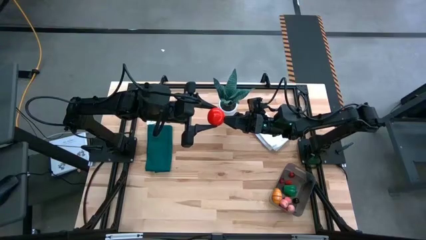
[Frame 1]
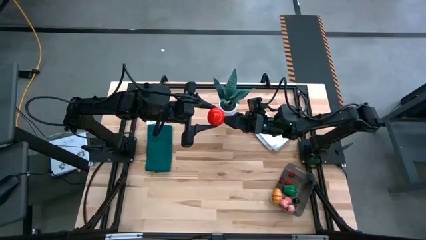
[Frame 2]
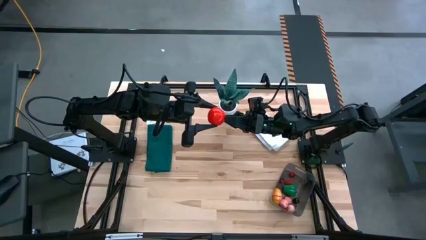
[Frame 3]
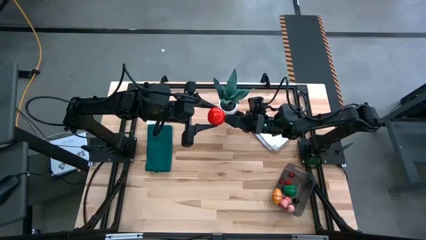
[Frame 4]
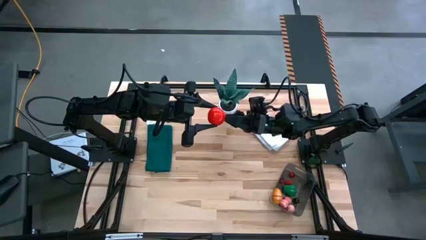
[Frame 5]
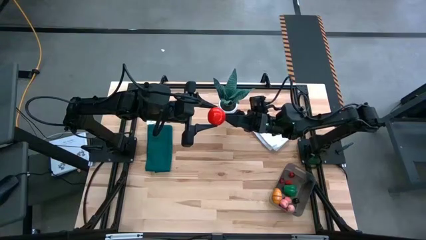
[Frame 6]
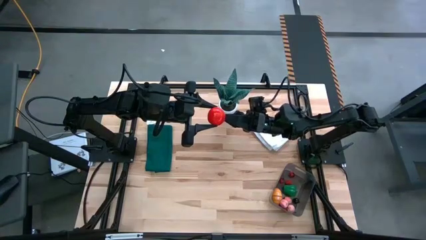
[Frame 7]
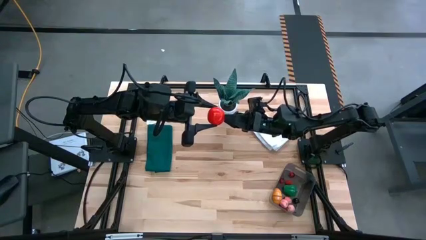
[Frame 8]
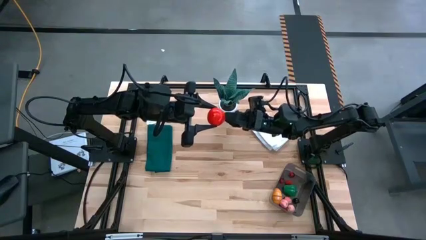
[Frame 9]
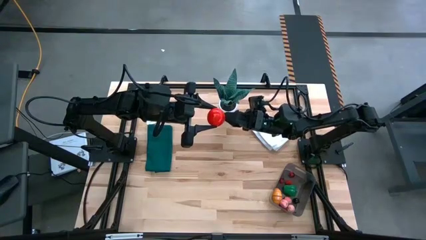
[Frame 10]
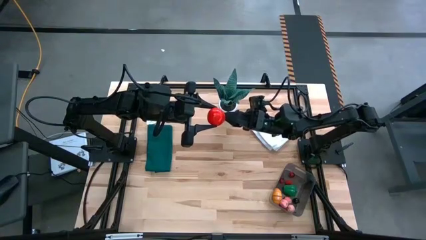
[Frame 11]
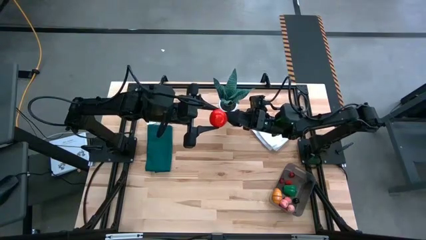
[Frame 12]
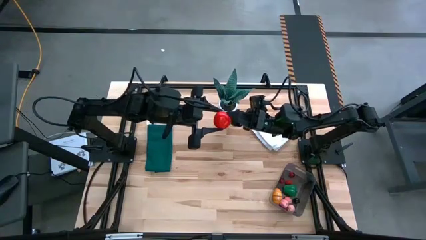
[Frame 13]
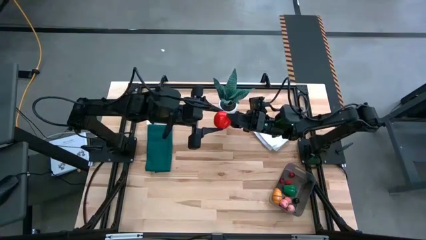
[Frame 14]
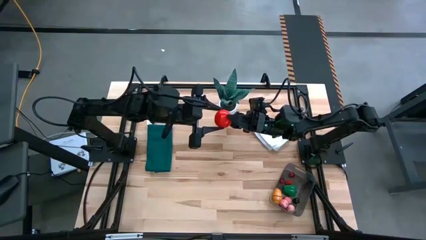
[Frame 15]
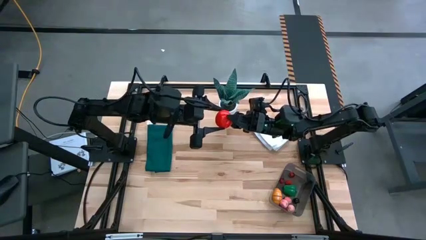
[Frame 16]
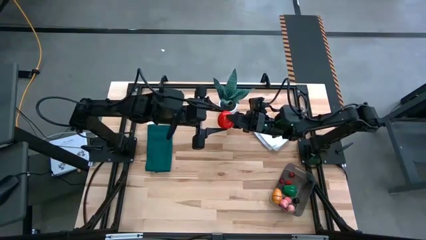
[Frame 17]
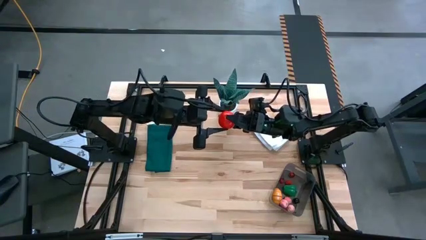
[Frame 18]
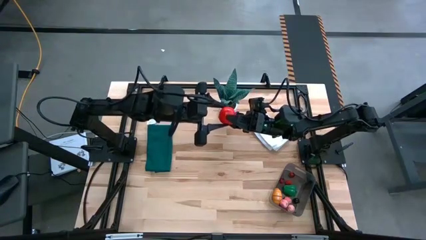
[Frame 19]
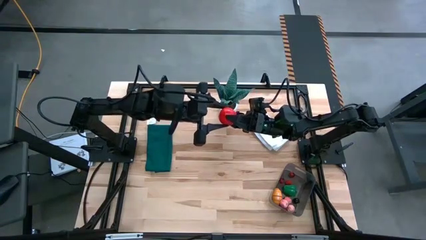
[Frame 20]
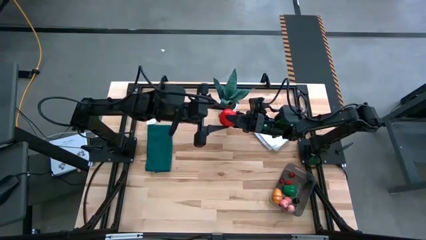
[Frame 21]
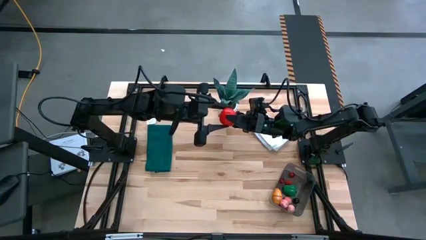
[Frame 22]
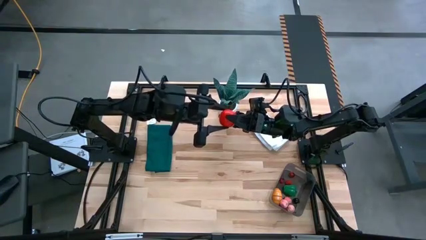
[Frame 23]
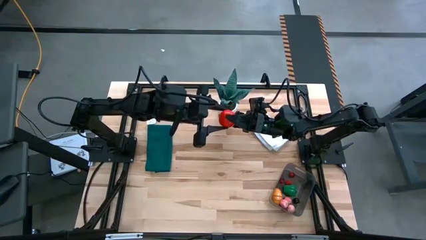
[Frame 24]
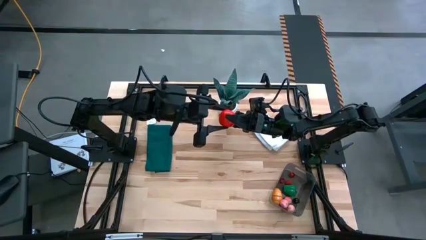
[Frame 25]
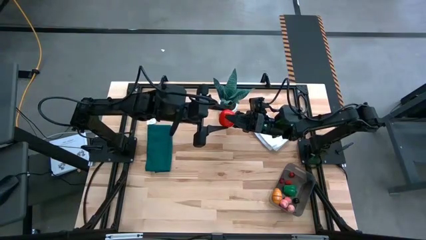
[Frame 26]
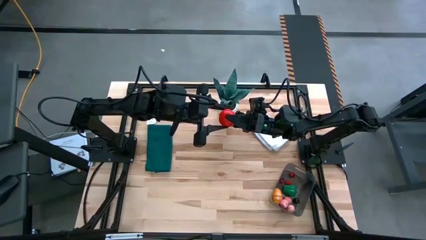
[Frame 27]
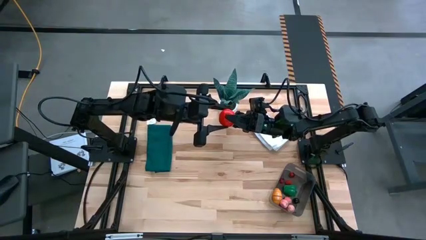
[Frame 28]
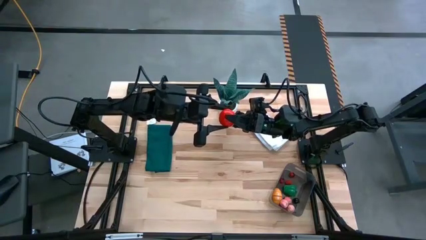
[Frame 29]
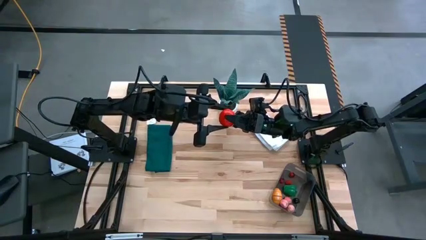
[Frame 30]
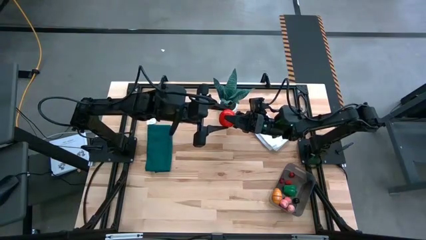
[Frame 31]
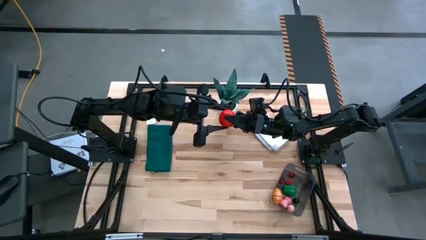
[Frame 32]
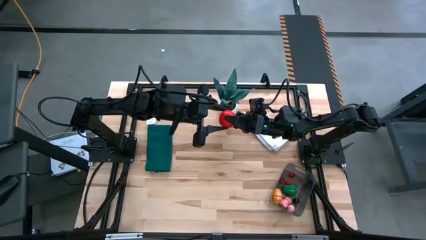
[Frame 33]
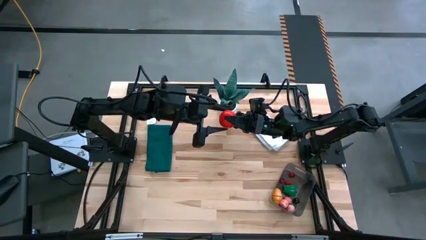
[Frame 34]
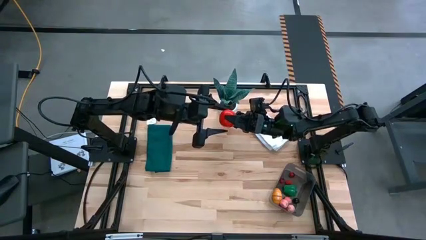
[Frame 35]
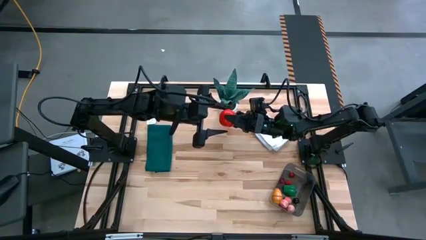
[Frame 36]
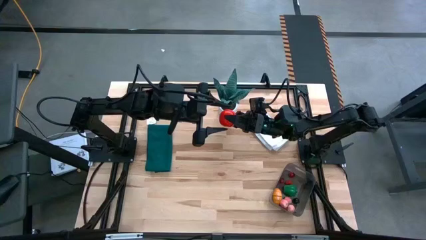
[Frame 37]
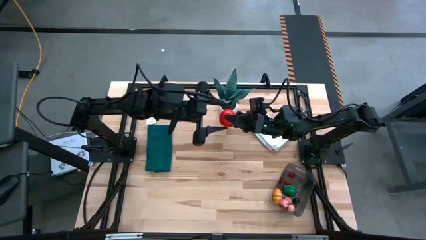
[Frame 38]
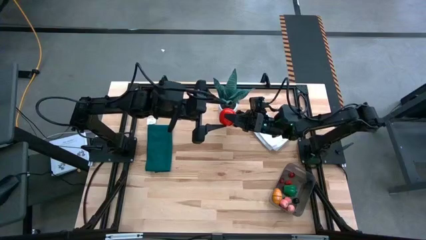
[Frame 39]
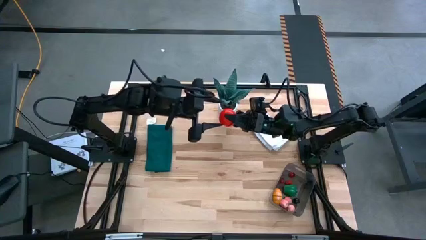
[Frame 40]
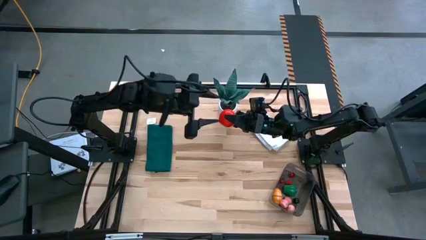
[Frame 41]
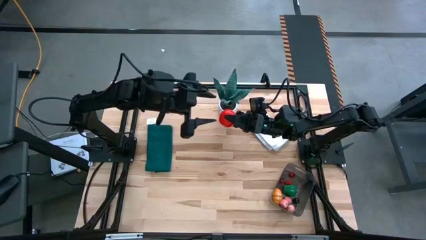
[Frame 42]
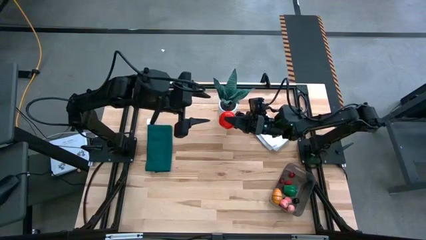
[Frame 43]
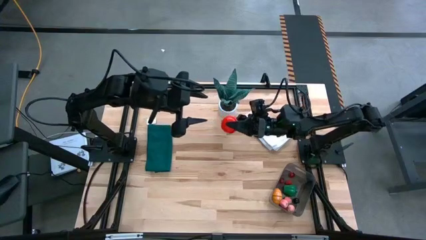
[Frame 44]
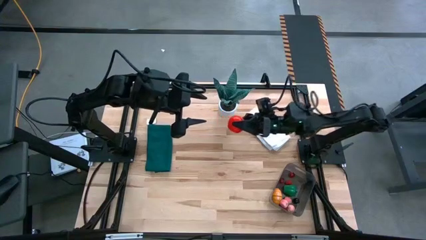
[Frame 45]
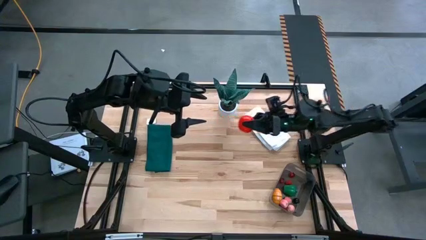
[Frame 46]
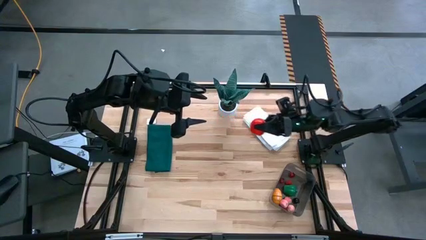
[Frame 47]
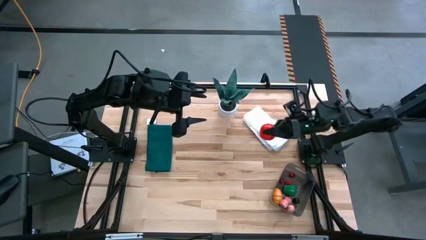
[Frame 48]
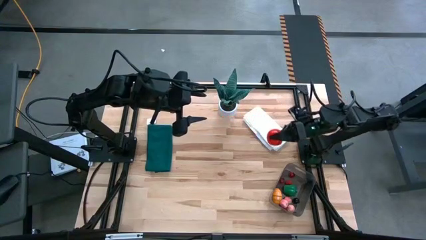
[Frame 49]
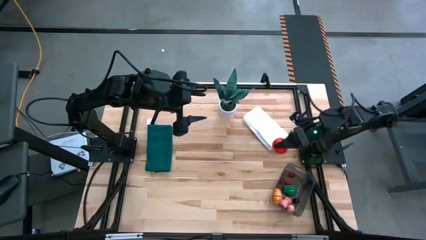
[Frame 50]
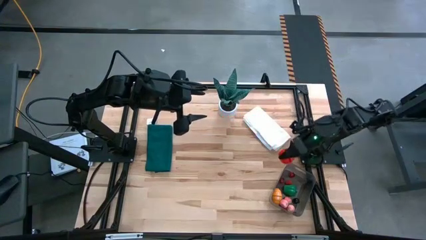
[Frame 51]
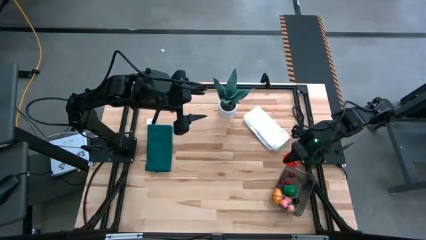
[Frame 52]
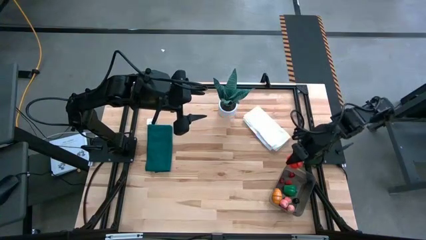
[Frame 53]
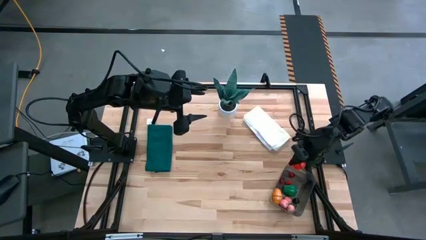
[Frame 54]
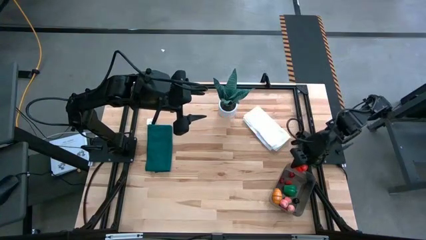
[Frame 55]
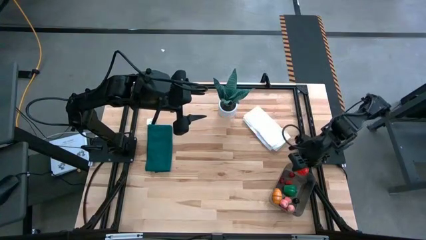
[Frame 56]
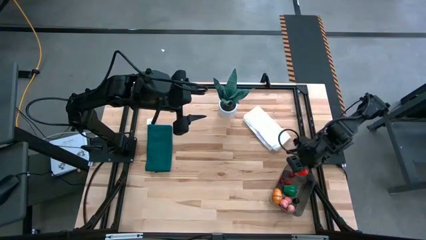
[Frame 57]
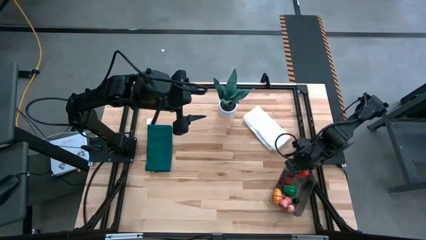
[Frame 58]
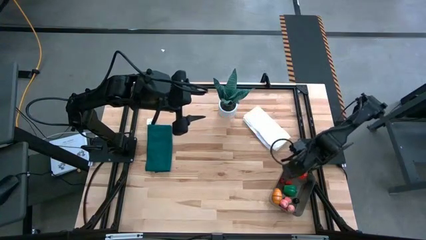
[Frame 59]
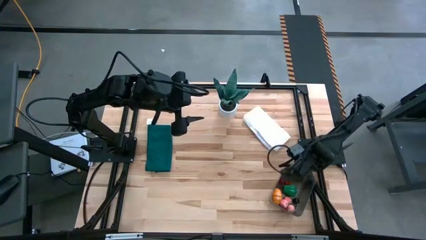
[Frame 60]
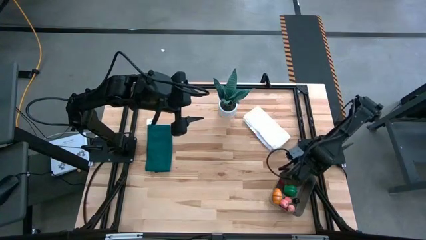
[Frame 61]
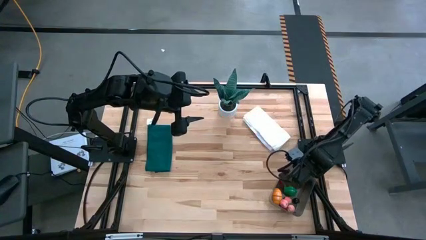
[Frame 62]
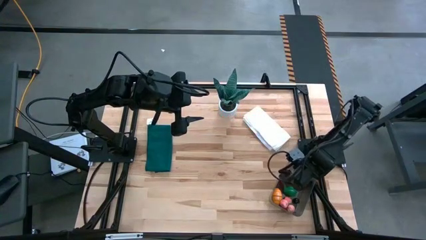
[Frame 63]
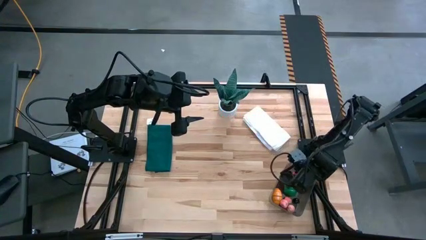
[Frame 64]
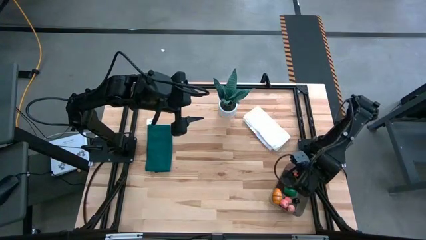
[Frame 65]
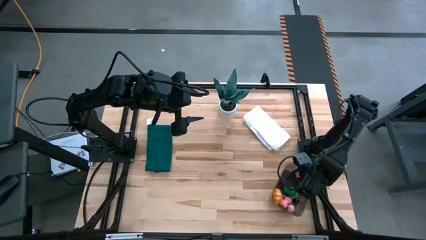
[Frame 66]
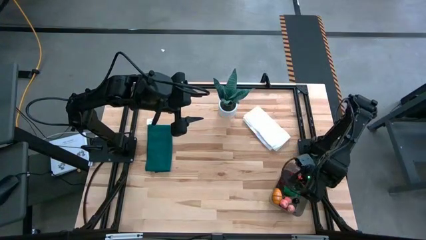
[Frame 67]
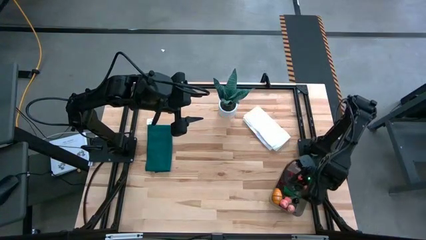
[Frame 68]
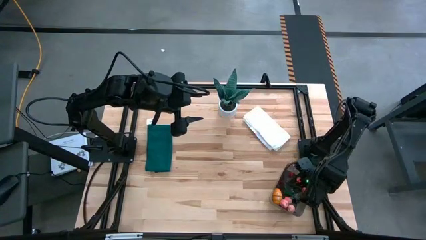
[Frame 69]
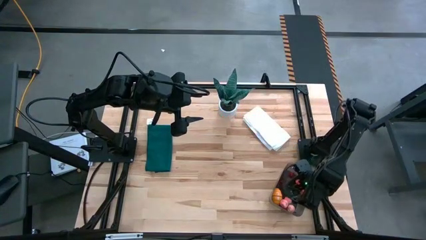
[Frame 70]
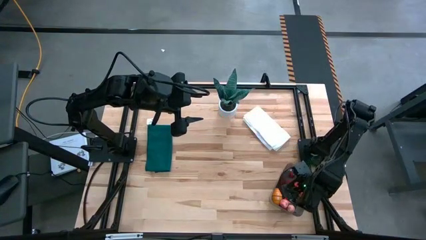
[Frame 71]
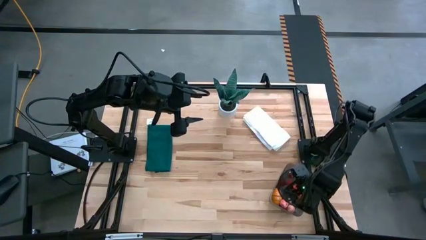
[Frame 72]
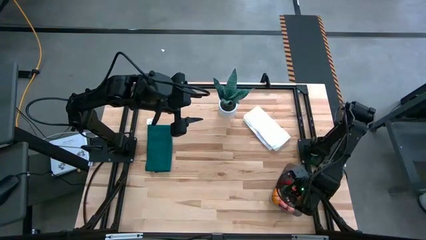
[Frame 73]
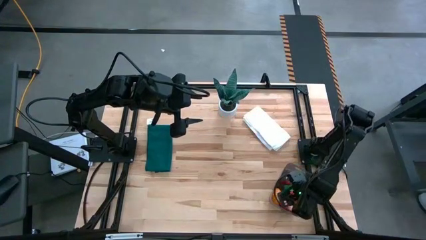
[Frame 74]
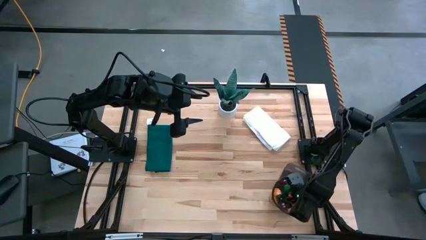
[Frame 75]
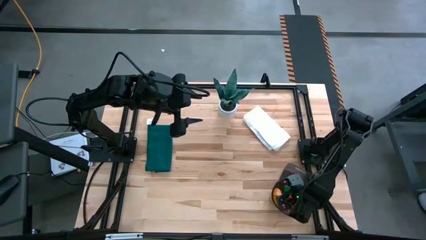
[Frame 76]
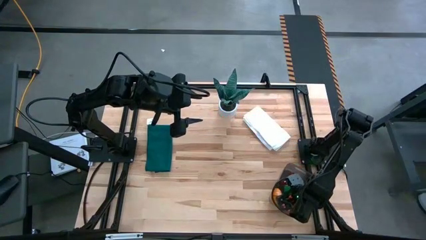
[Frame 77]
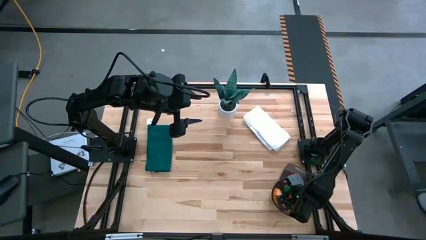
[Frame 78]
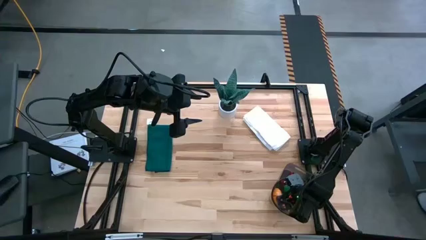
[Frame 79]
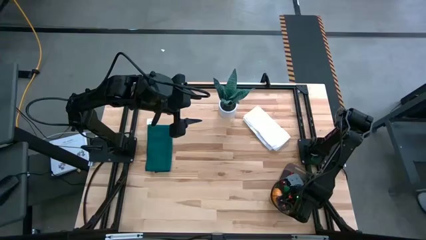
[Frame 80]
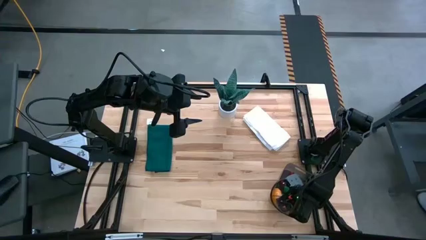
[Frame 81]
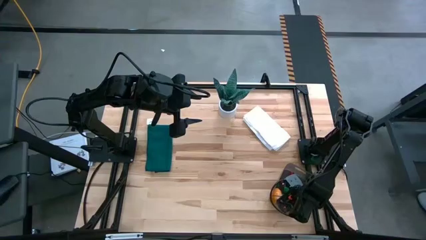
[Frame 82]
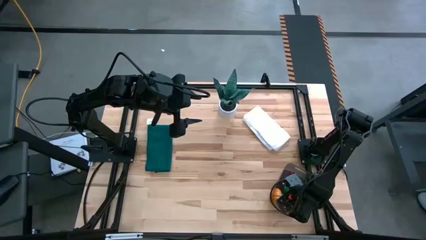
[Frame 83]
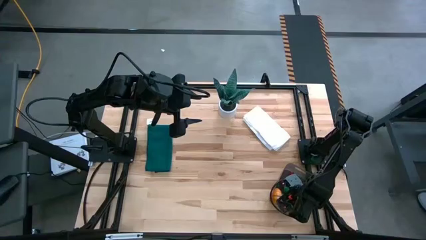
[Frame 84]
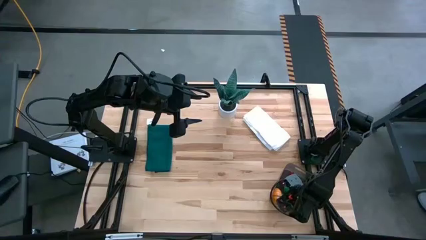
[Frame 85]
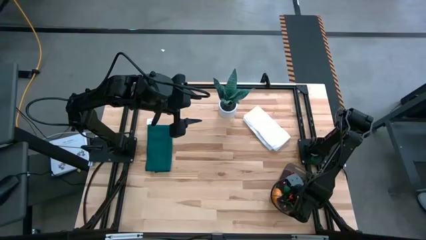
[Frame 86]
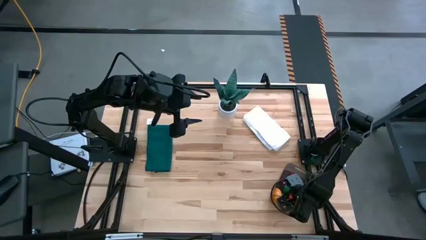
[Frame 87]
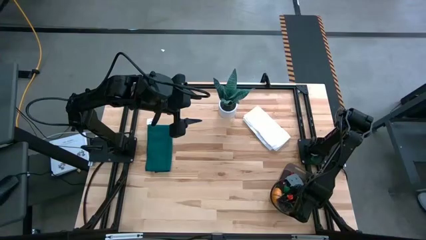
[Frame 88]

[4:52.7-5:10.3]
Task: Pick and placing Produce into tupperware
Put the red tomato into the black bin
